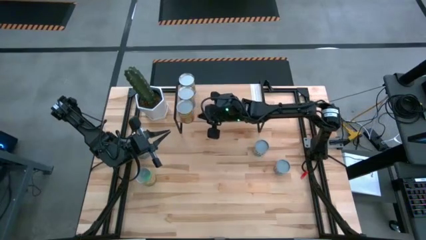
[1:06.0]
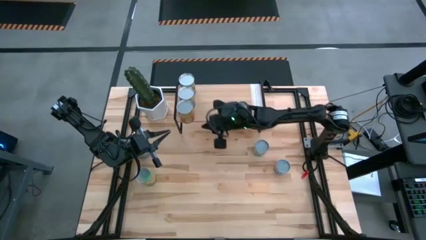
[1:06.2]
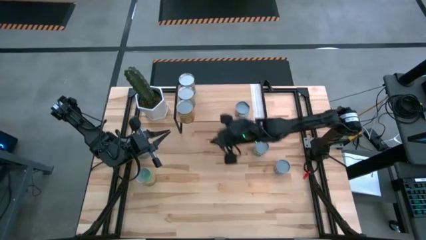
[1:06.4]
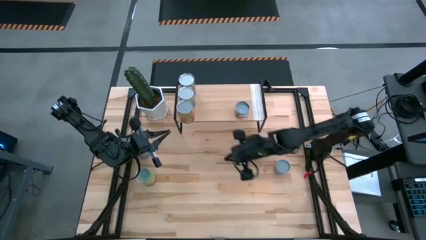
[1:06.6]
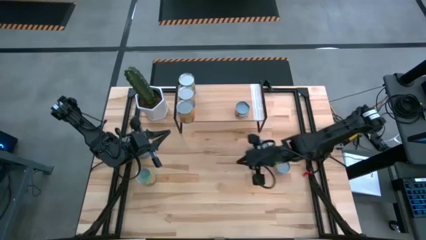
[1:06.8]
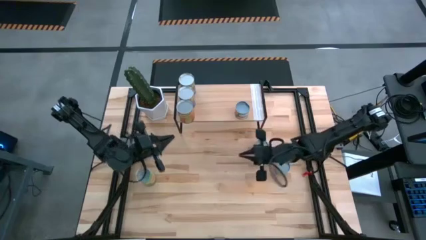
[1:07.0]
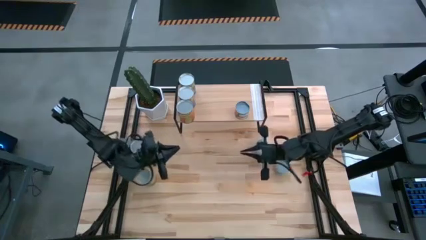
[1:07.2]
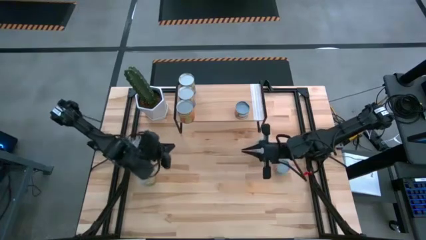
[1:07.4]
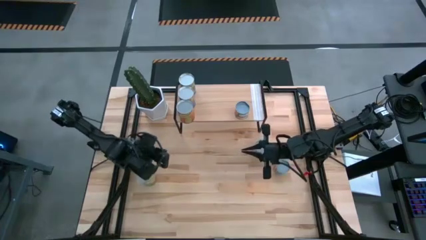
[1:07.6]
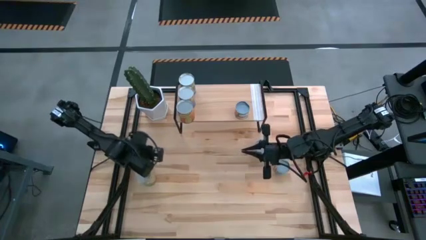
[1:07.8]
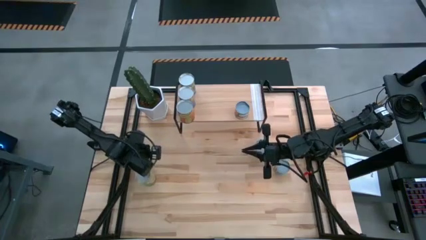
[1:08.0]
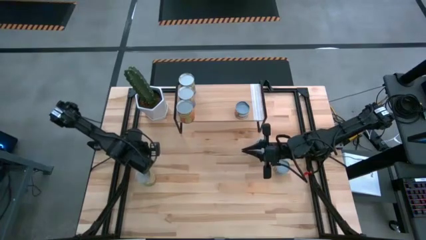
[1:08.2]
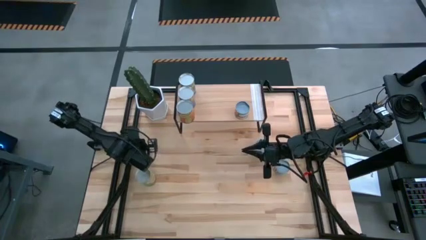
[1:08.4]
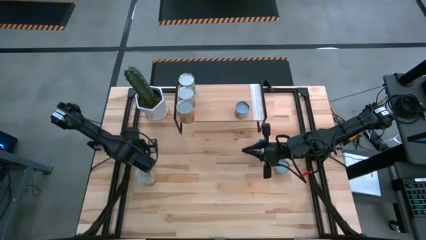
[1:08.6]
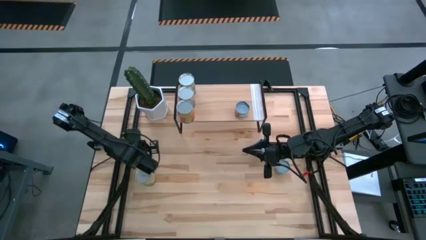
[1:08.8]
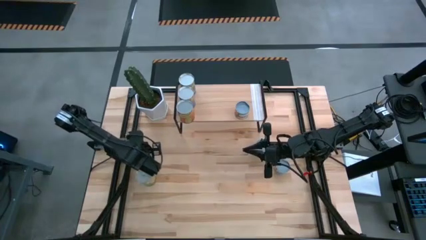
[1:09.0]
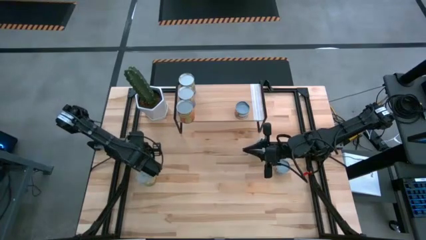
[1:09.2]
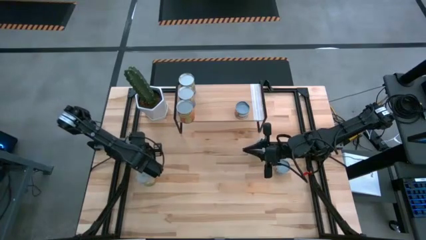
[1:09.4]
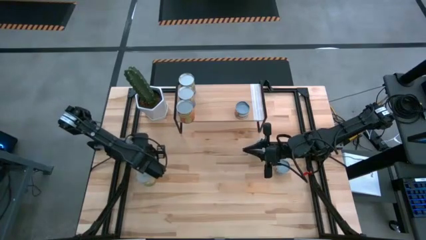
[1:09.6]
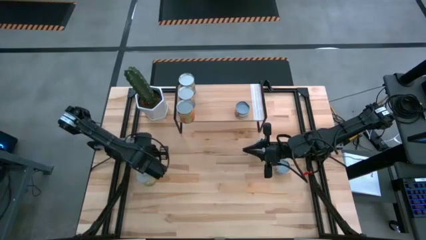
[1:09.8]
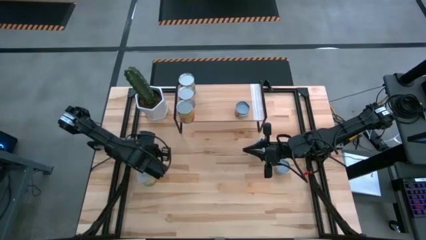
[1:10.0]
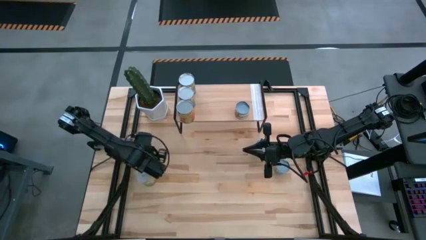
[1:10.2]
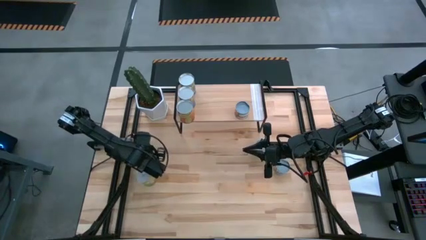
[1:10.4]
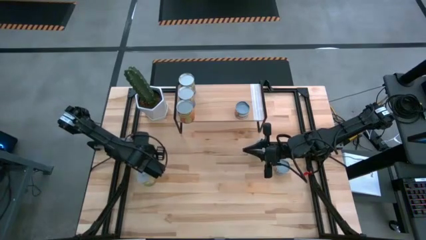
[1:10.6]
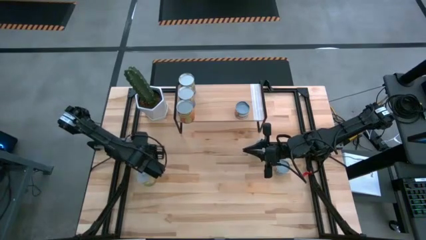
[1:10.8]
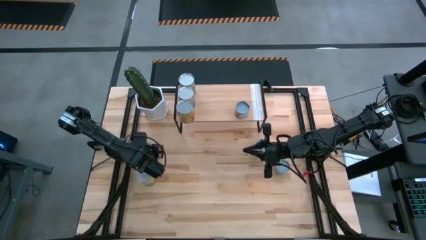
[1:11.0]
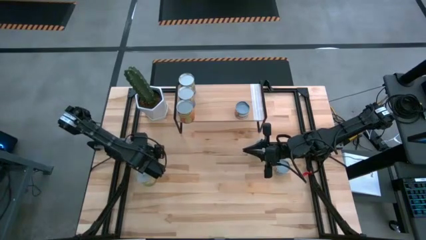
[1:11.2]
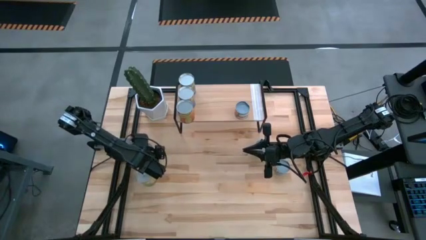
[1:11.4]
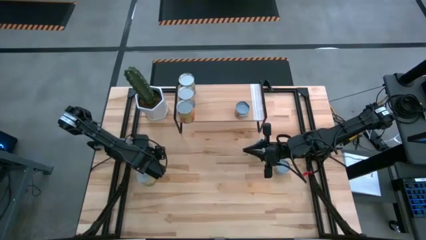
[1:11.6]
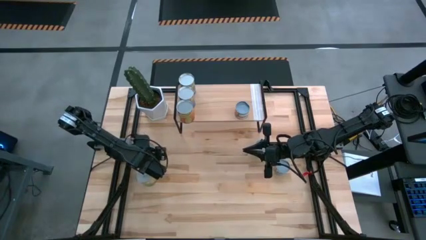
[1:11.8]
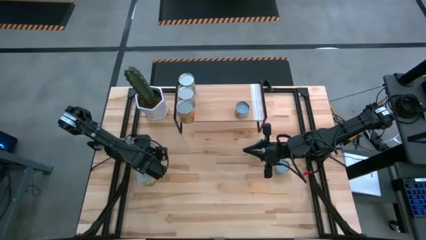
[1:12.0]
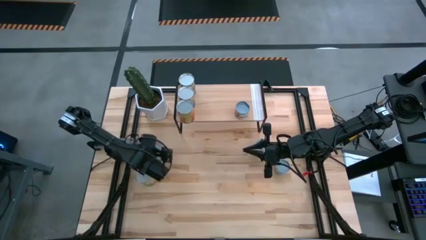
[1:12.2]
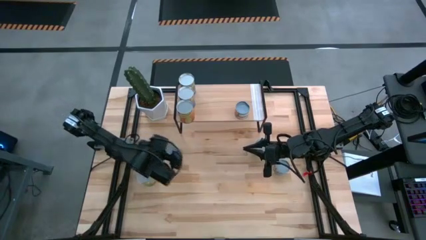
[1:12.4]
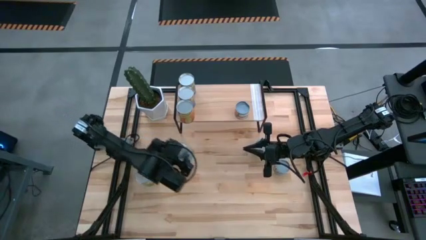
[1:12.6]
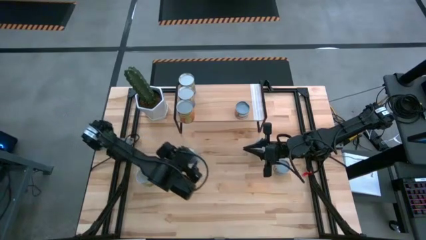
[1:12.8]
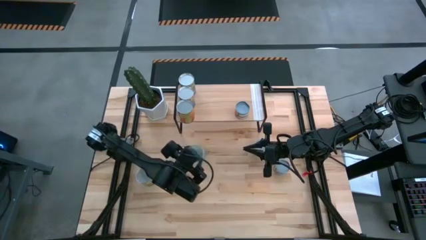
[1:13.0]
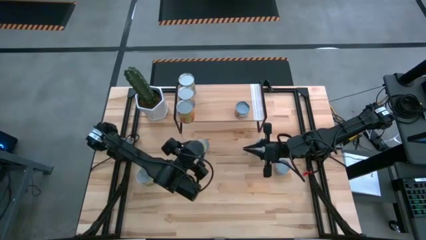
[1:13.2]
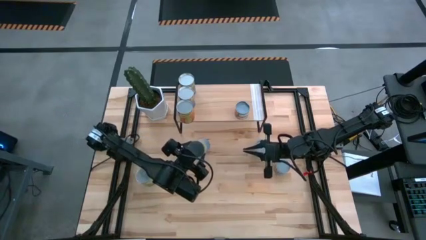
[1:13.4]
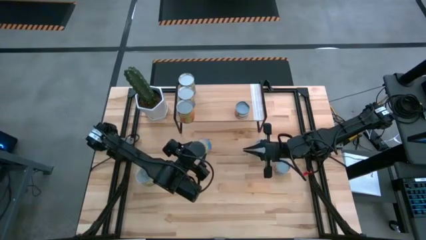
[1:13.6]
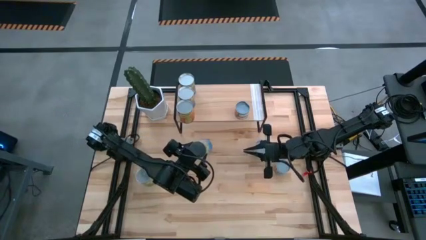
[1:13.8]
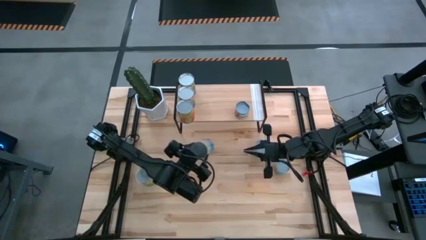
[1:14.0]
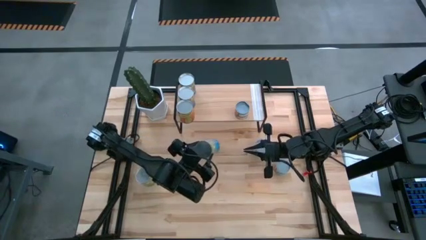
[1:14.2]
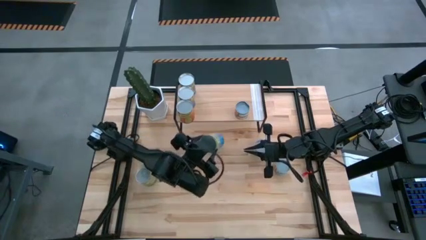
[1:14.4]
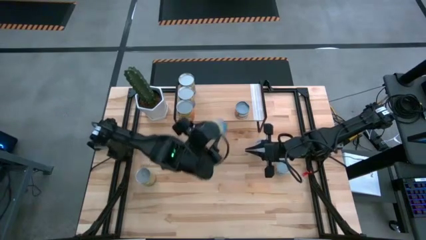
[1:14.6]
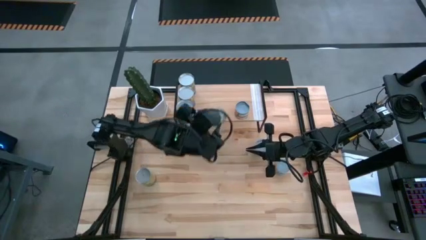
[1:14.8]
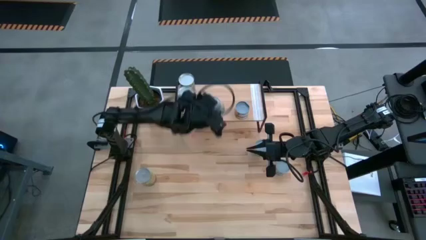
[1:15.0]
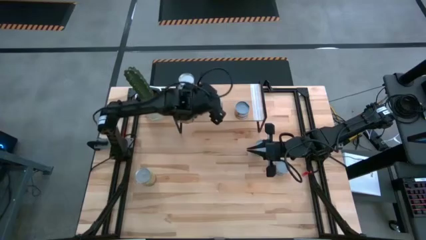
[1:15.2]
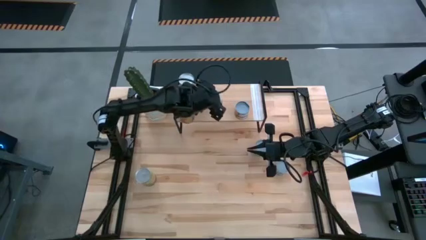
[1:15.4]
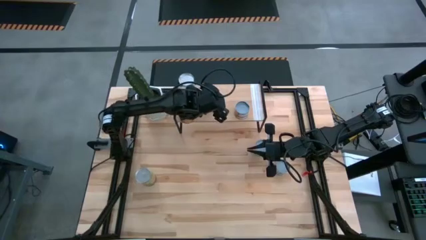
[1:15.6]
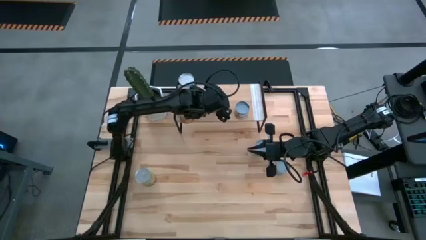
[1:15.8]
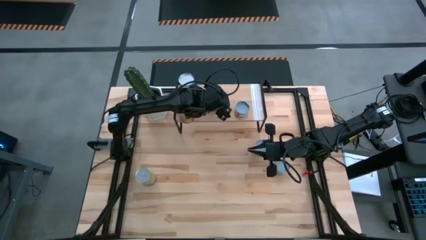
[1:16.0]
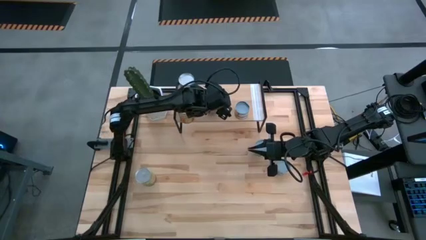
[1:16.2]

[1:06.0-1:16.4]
Task: Pick and place cans onto a shelf
Put the canned cherries on the shelf

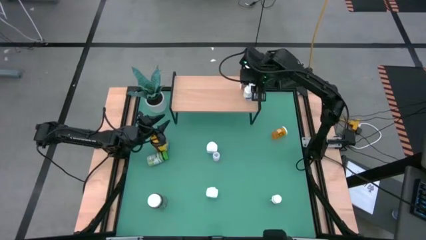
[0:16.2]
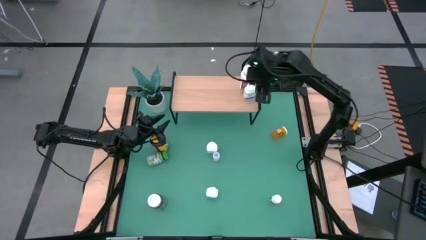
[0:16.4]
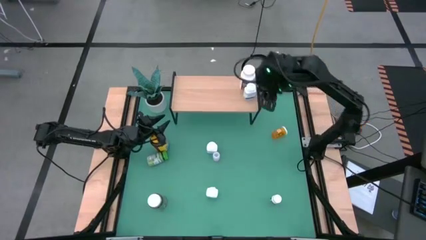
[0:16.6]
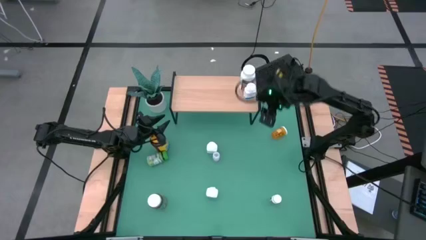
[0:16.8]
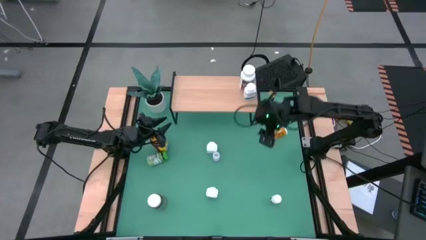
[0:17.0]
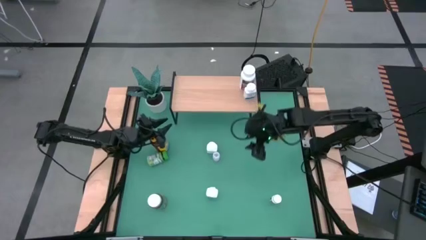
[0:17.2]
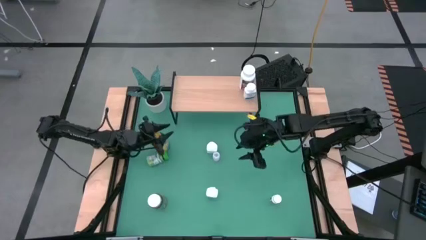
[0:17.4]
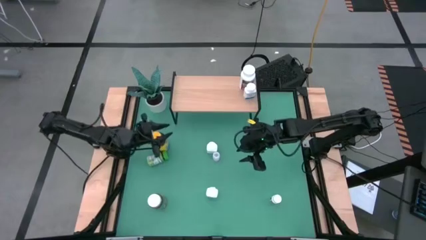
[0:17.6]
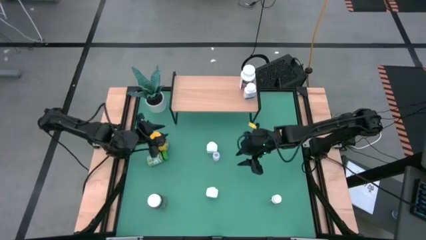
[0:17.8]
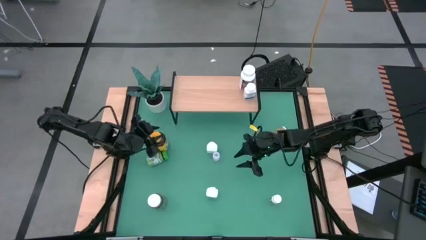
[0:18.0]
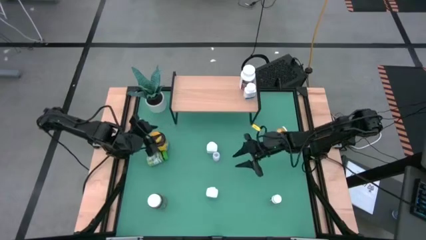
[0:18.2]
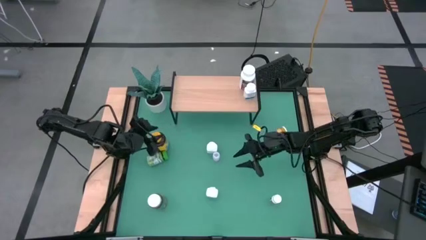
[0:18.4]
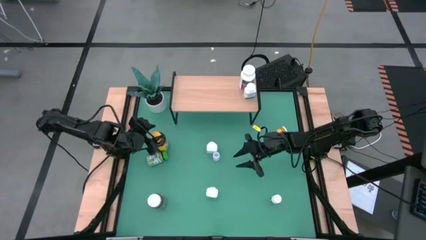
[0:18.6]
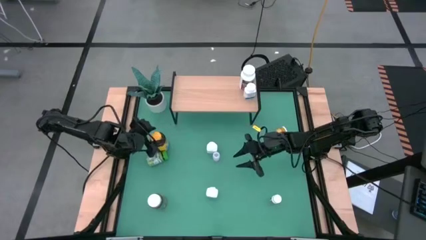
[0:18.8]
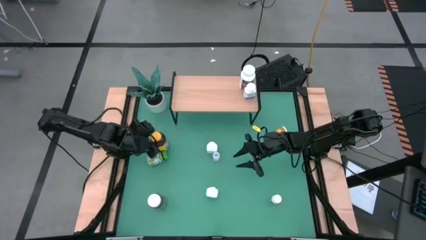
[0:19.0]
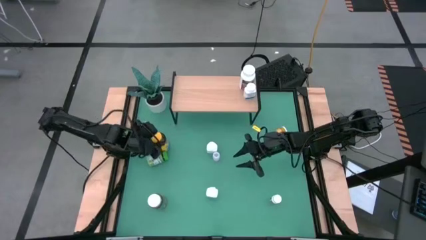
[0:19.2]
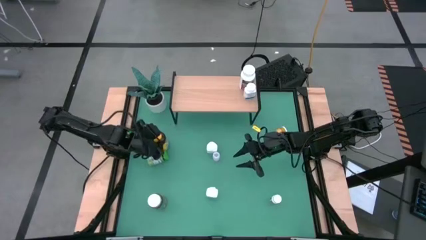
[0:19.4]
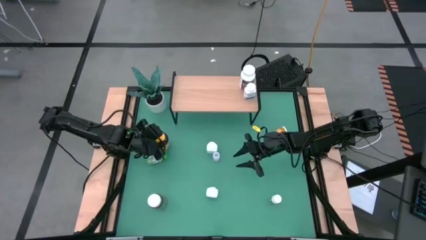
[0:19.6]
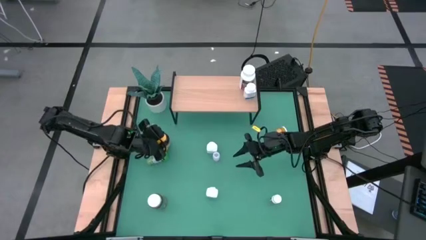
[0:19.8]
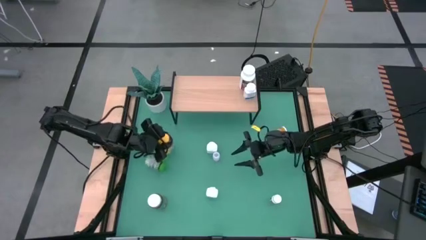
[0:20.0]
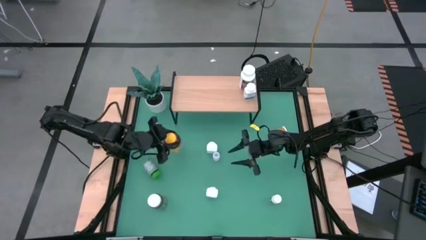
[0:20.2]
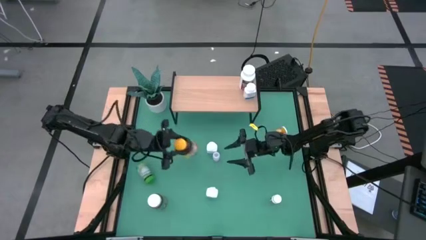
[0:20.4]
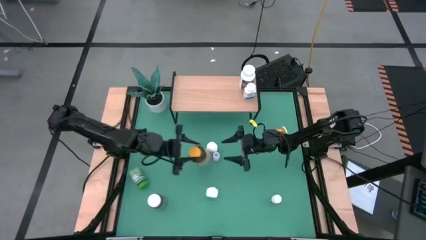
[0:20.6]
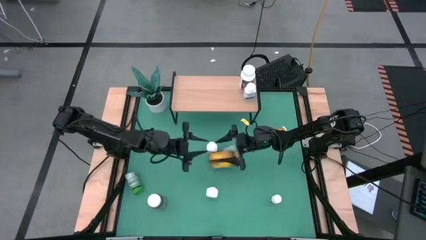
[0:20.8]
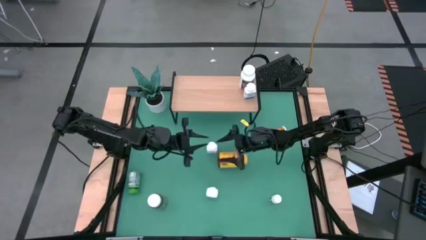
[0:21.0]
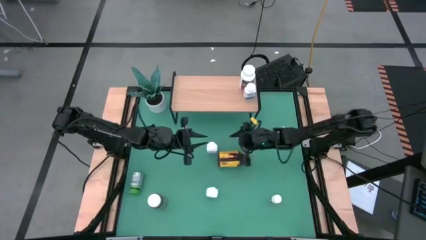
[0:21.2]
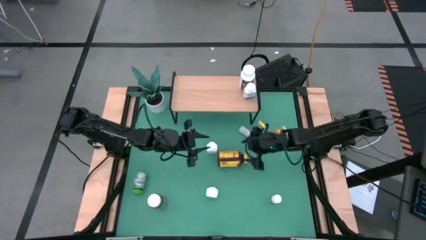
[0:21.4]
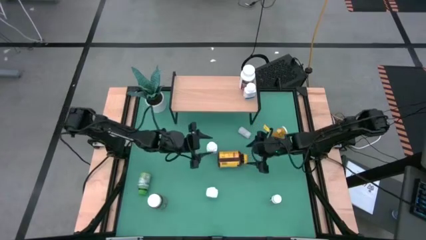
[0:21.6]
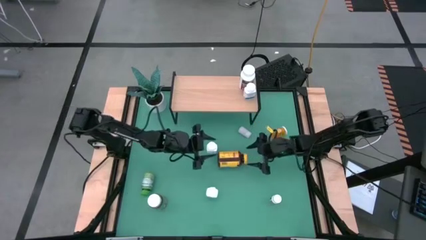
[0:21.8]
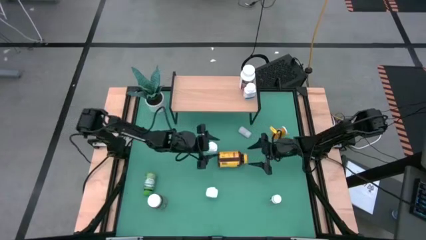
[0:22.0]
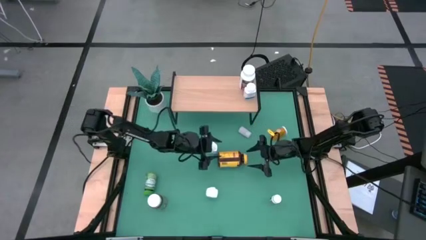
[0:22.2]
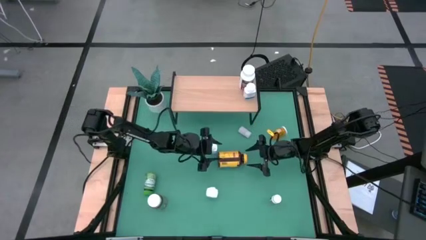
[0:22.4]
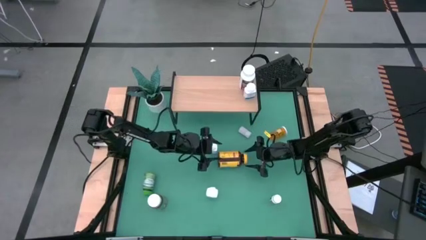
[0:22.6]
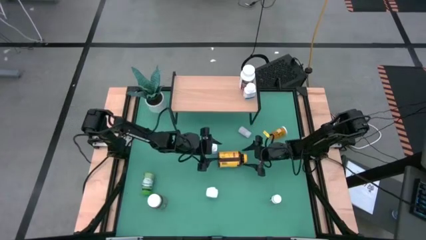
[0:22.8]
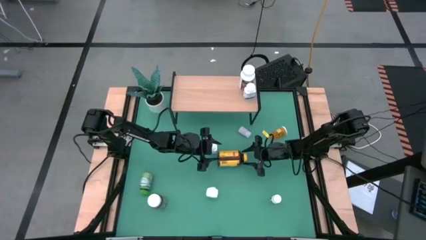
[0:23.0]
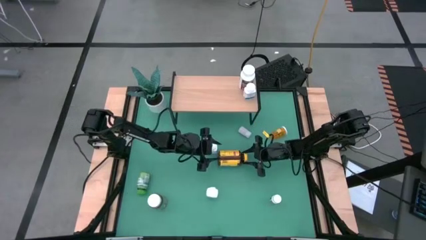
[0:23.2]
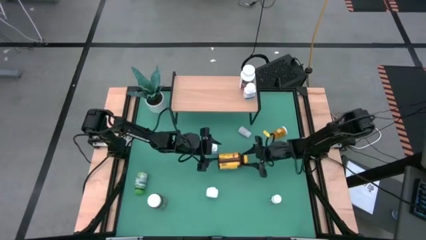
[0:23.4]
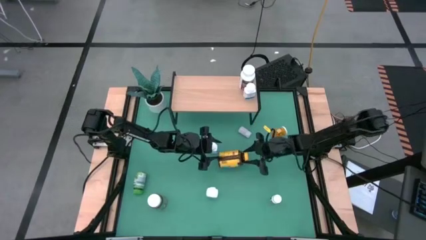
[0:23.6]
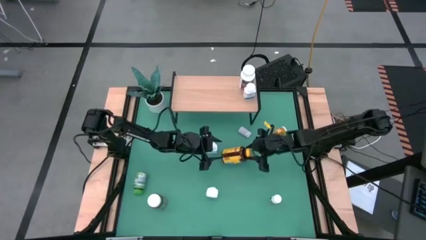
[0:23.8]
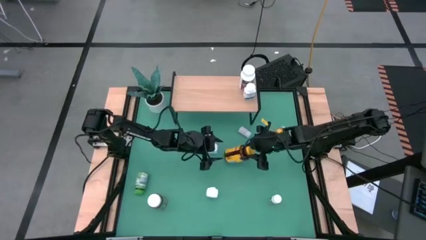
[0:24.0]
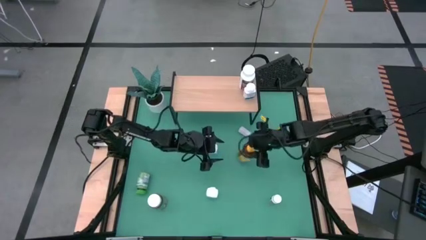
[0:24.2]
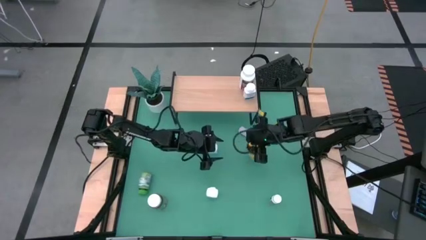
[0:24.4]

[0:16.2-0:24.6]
Task: Pick and place medicine bottles onto shelf by color
Put the yellow medicine bottle on the shelf
